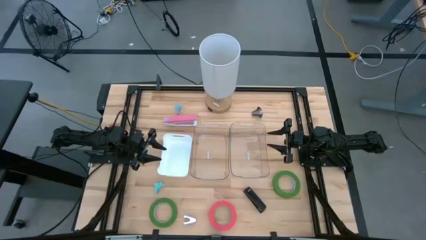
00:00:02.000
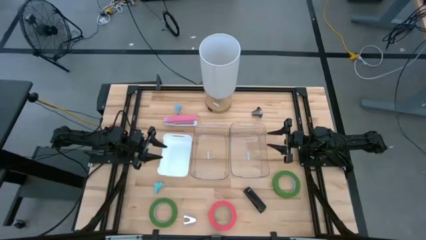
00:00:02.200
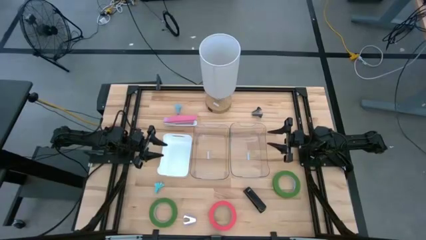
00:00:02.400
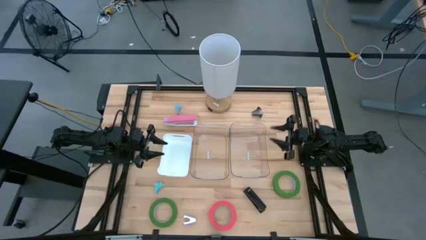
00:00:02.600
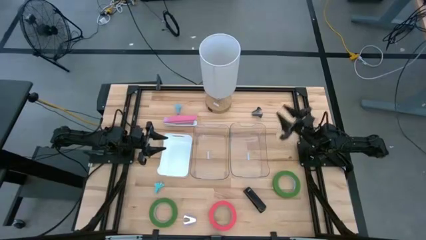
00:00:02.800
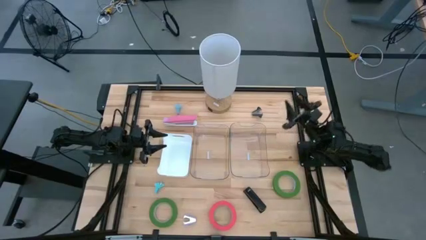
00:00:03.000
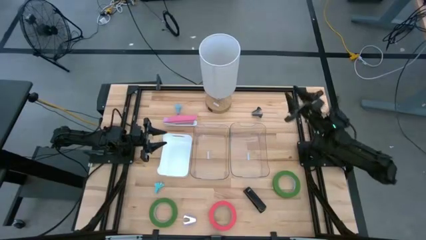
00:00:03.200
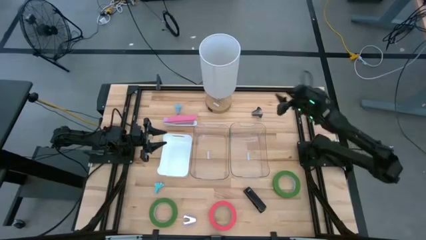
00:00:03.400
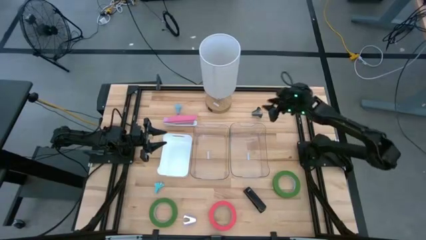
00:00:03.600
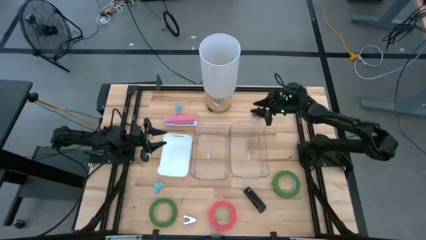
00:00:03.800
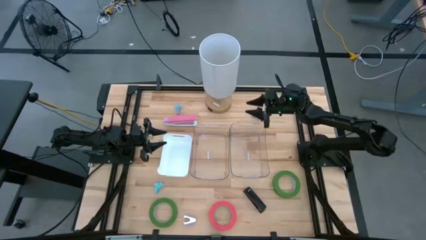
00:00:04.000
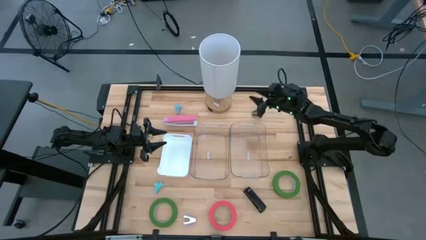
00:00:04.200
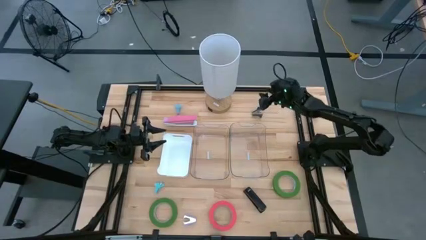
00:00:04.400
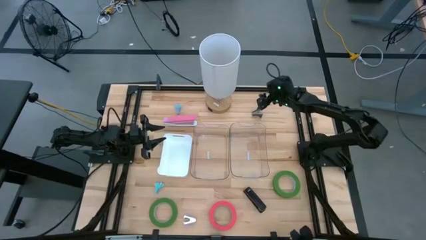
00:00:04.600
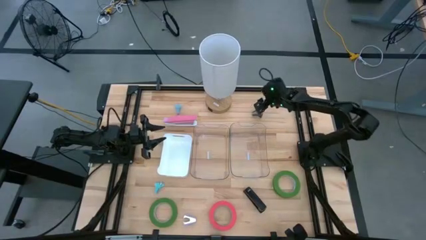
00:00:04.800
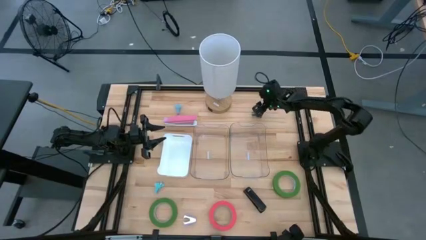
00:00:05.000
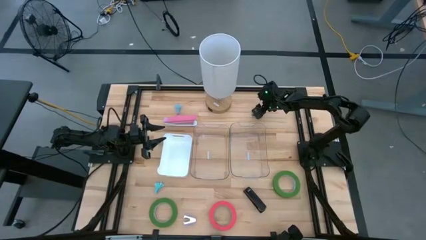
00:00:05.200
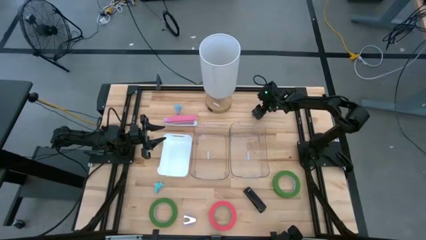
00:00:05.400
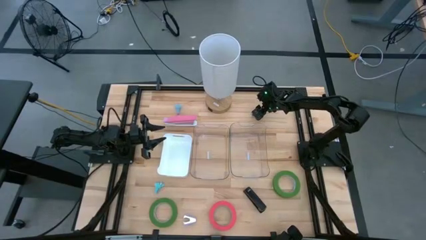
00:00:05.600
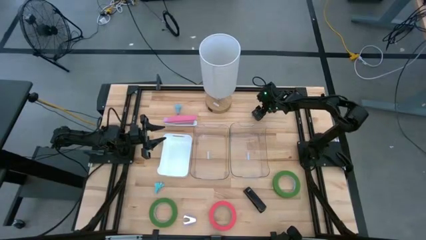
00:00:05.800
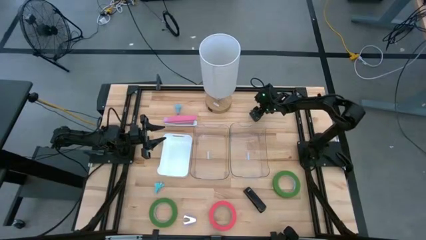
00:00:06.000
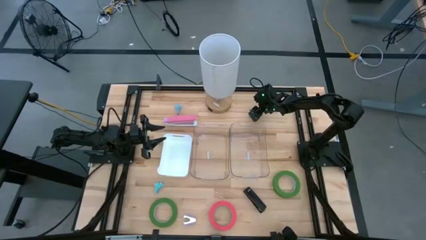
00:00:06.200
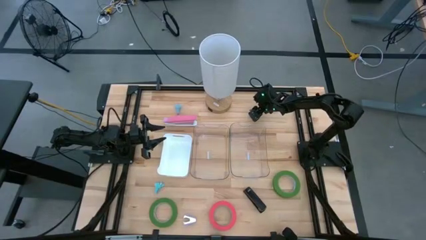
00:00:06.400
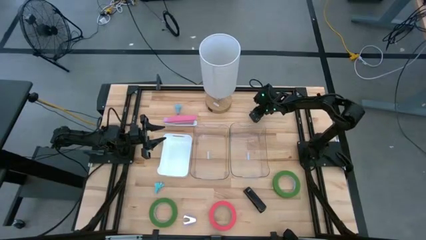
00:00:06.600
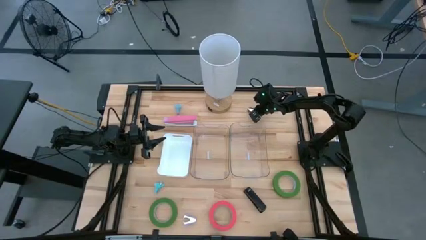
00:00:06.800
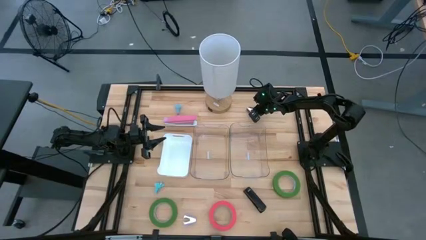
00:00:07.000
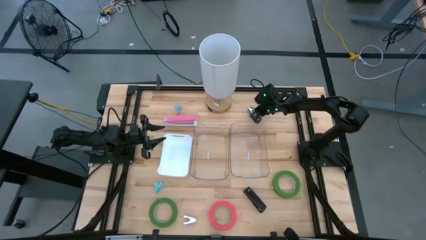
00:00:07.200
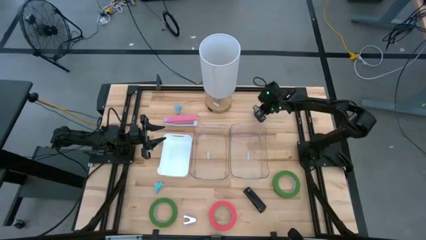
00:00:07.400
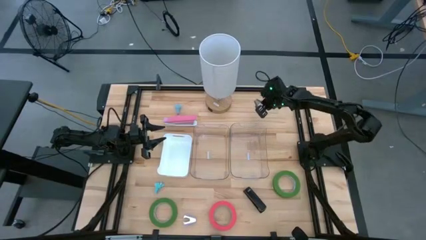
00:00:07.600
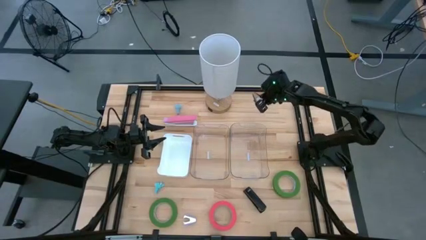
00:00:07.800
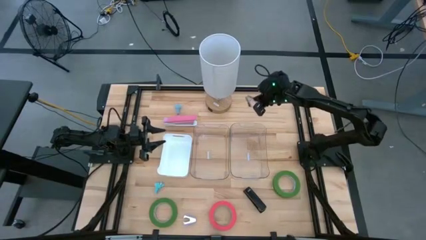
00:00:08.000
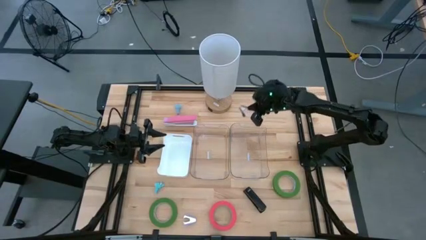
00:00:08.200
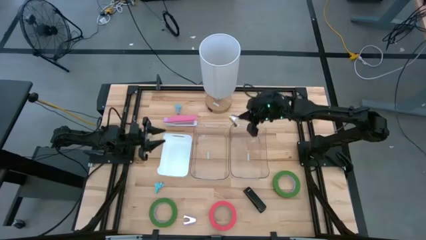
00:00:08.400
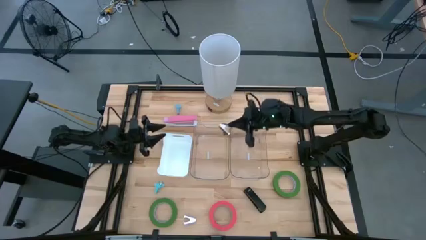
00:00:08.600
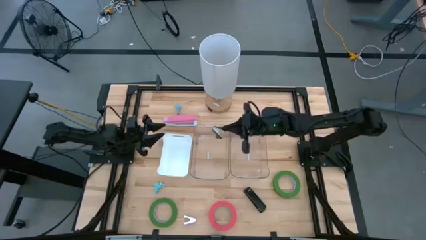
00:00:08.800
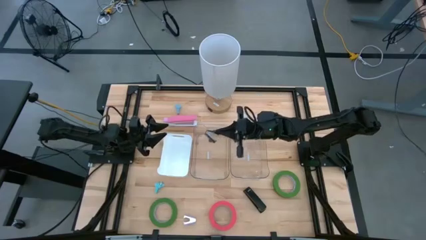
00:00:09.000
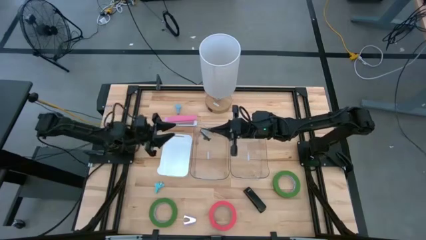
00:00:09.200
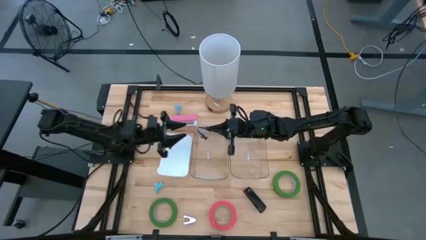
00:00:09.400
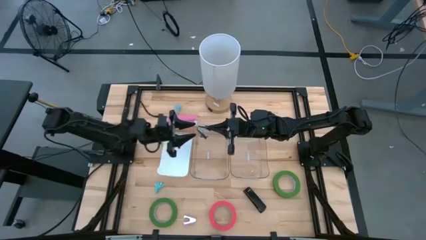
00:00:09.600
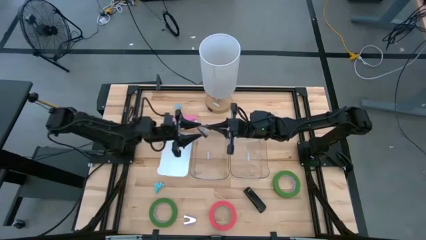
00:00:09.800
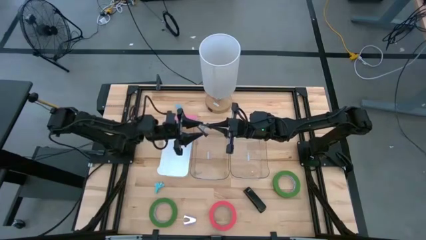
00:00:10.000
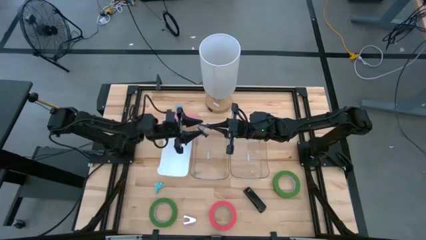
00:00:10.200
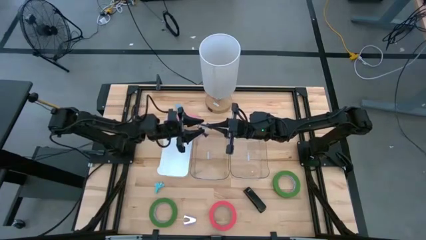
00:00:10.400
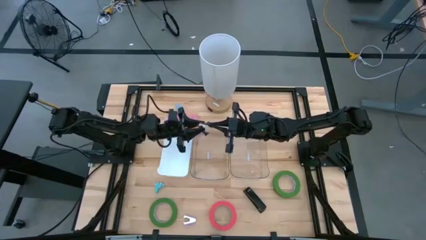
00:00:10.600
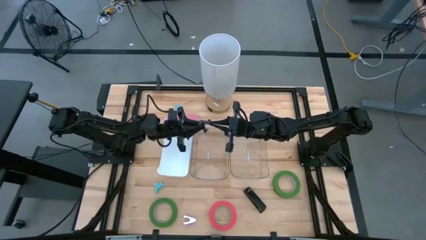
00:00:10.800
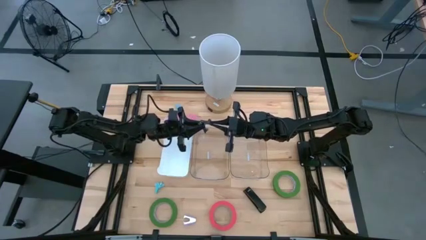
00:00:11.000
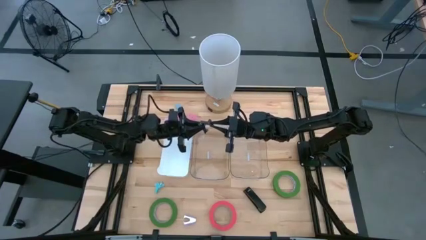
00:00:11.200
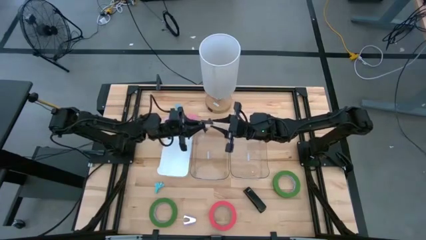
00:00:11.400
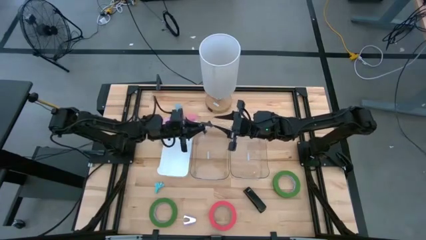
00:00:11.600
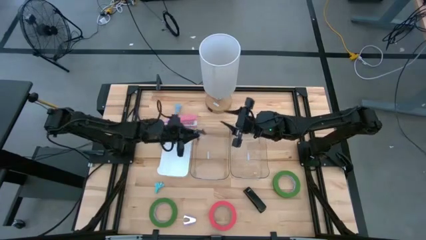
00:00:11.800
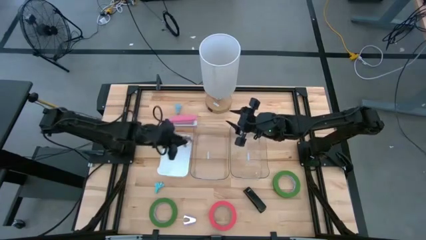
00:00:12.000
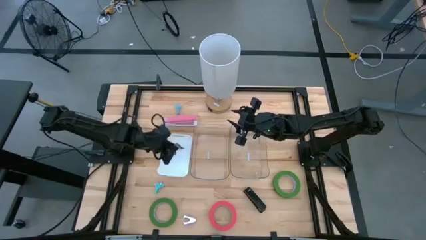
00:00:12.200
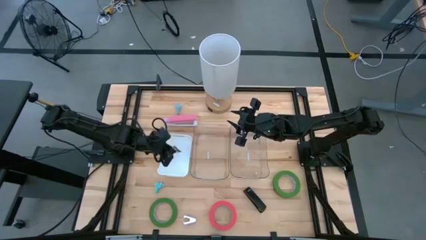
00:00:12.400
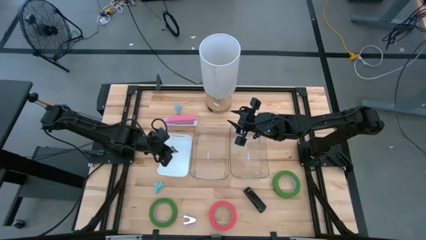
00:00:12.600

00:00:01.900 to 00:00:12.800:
Task: Pick and place Stapler, Stapler remover, tape
Put the black staple remover into the white bin

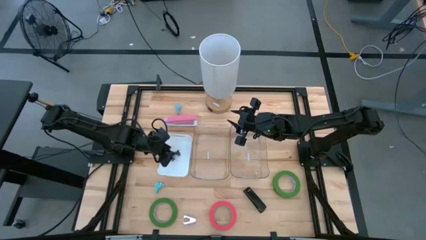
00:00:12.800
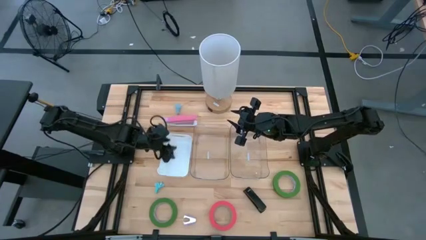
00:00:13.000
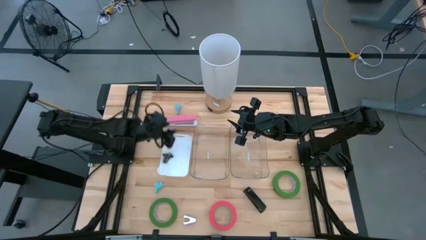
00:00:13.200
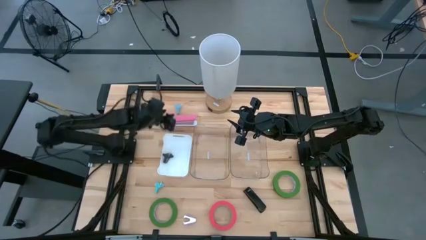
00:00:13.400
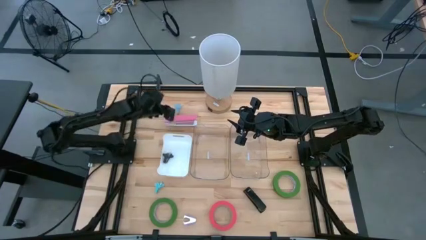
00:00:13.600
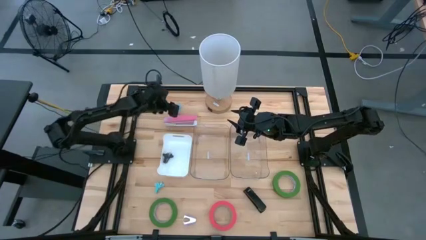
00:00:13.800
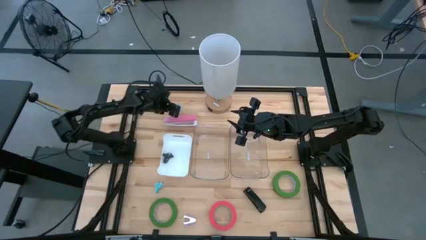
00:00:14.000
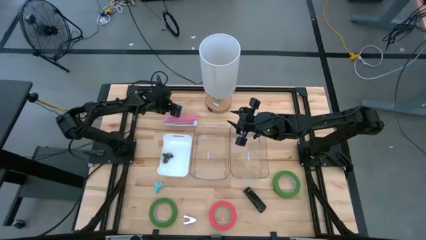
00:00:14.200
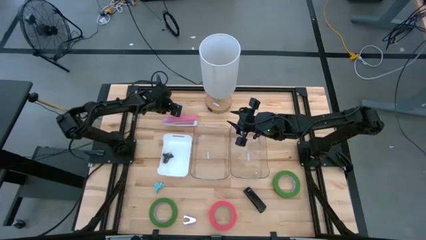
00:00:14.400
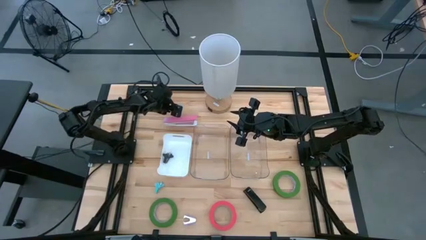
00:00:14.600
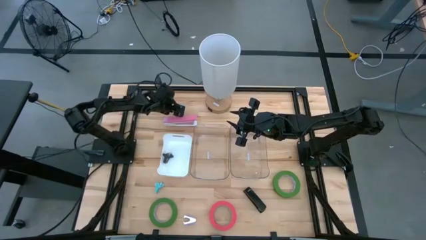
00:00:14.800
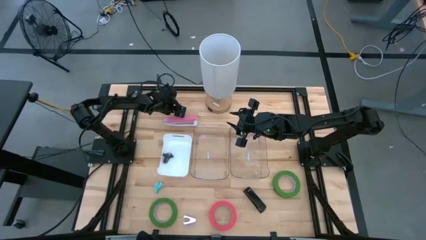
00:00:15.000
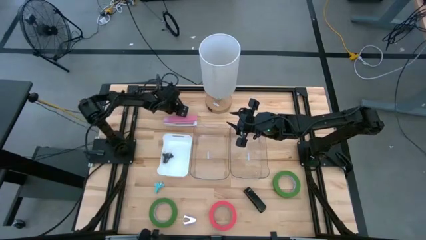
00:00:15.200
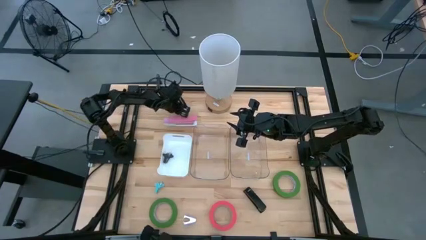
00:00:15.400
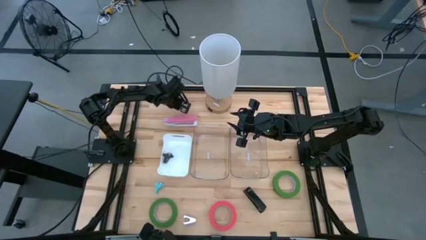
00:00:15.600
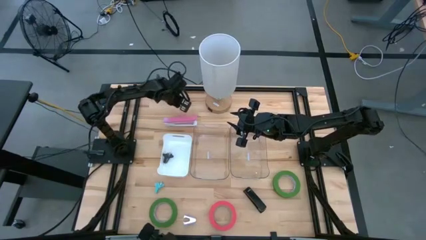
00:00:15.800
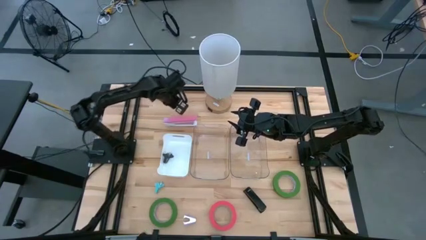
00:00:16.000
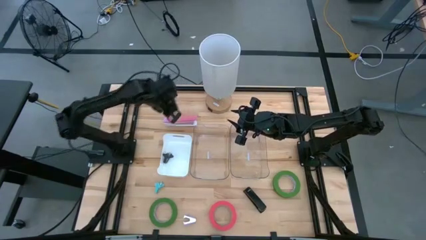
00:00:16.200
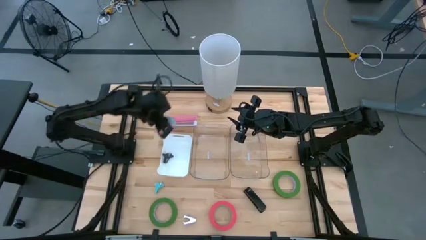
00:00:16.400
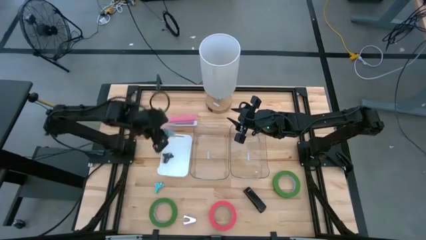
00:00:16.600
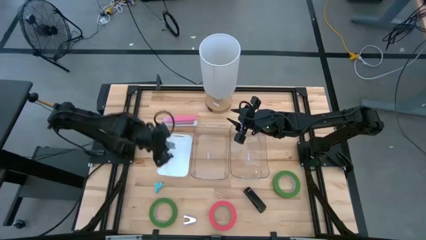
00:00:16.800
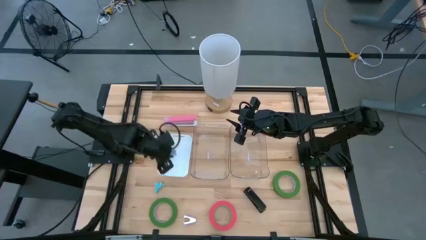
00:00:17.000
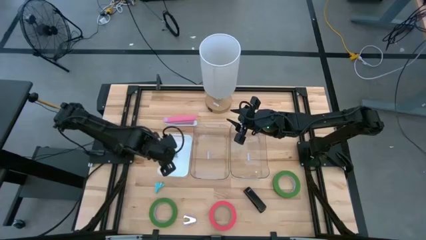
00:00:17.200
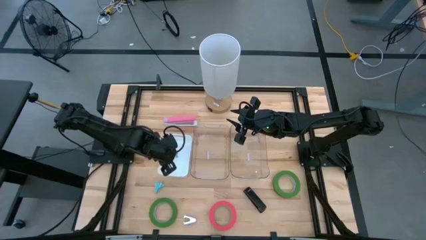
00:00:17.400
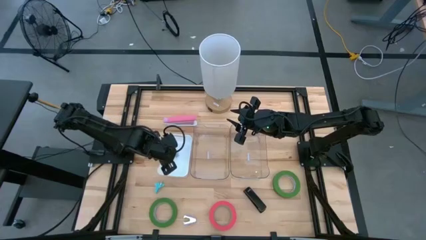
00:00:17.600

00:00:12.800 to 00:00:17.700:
Put the top blue staple remover into the white bin

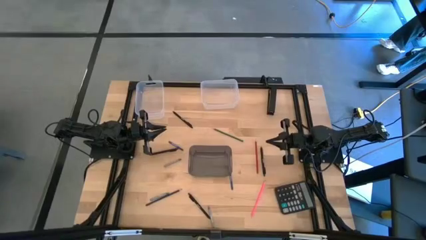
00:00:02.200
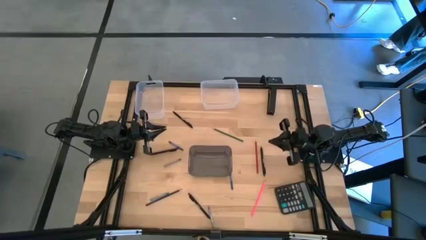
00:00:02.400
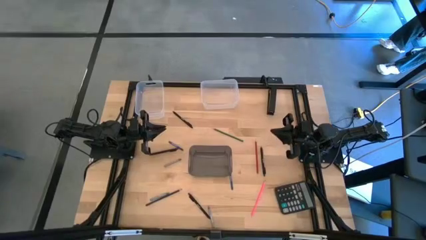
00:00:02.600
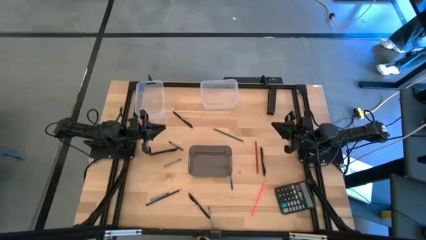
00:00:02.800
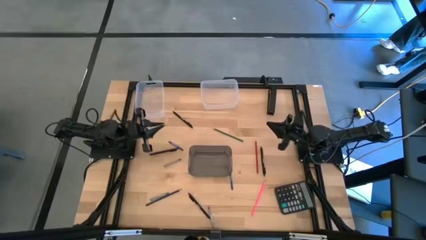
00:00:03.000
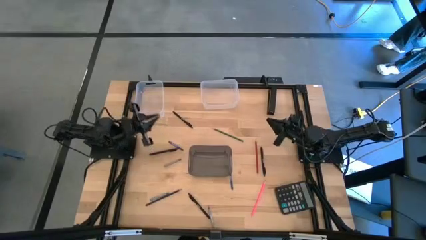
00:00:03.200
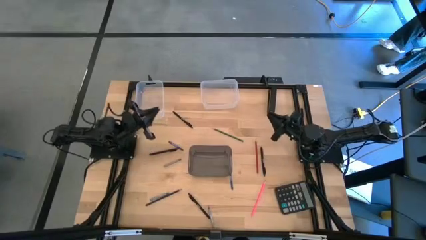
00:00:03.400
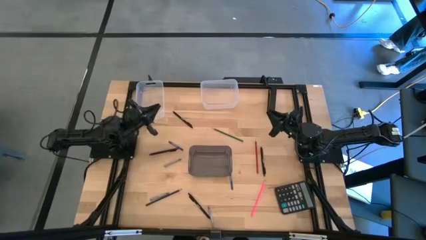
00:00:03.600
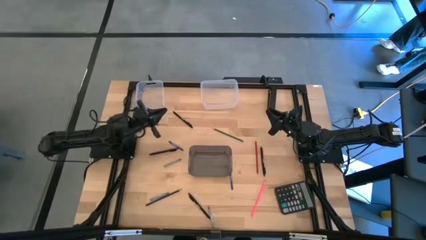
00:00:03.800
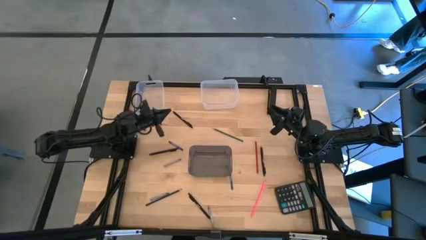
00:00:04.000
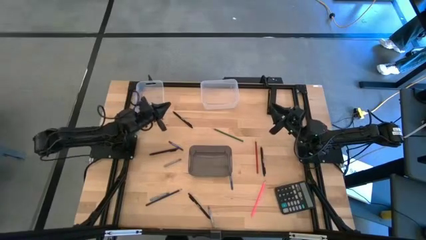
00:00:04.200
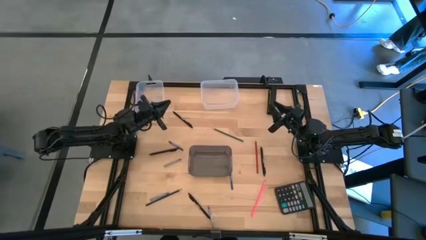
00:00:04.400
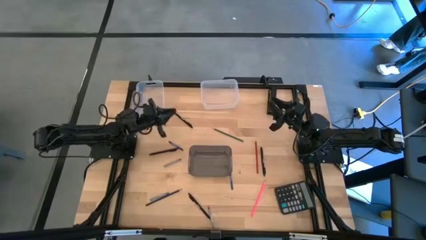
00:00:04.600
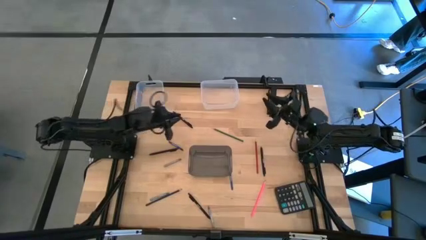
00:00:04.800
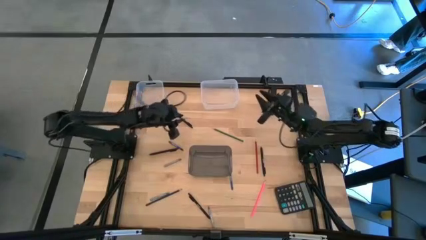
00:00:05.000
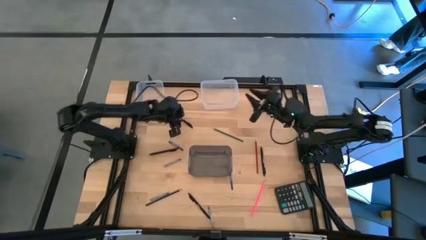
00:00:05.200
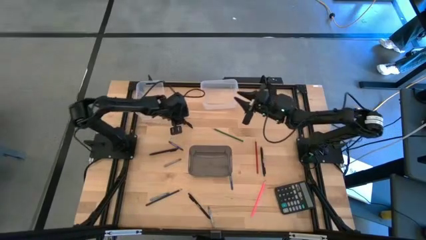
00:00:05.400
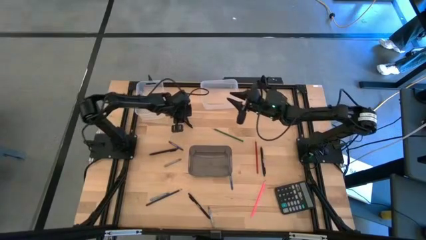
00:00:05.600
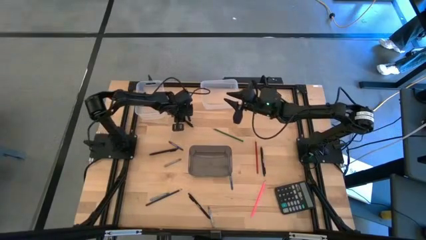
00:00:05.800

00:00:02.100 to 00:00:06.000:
Task: Sort crayons/erasers/pens/pencils in bins
Put the black pen into the left transparent bin
